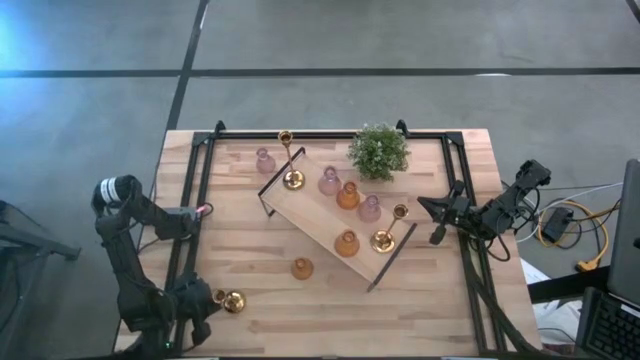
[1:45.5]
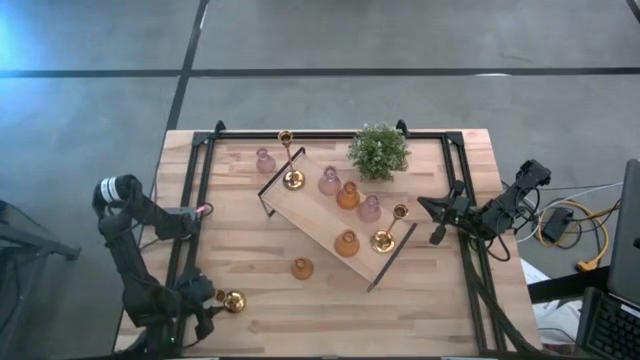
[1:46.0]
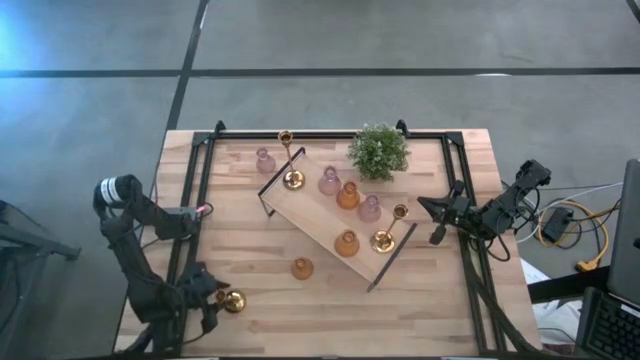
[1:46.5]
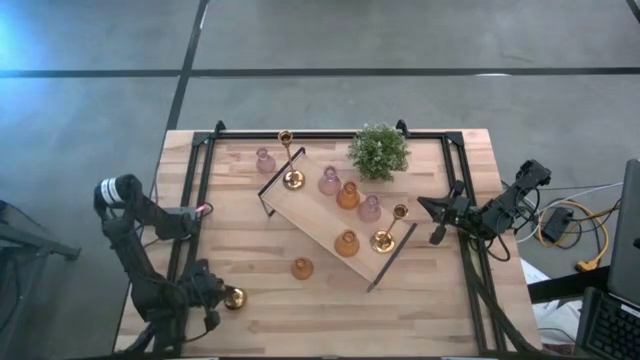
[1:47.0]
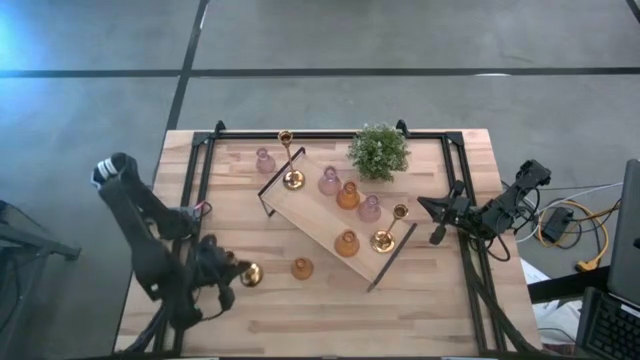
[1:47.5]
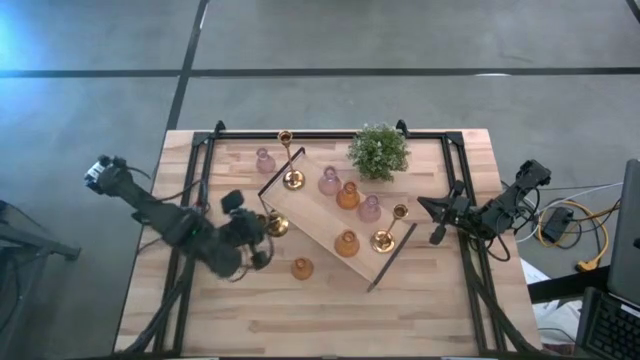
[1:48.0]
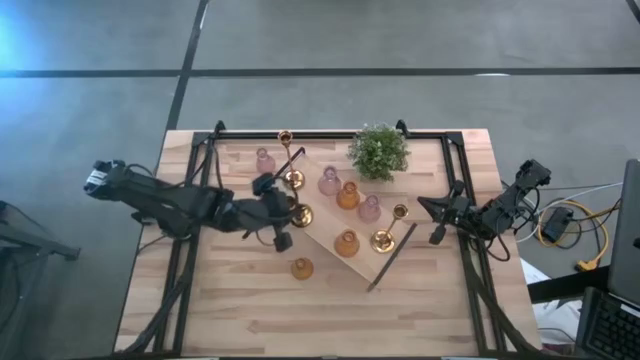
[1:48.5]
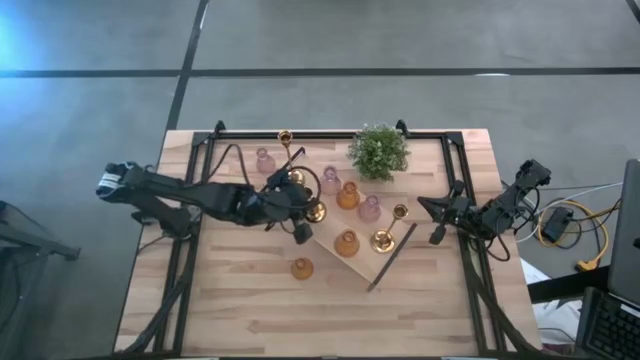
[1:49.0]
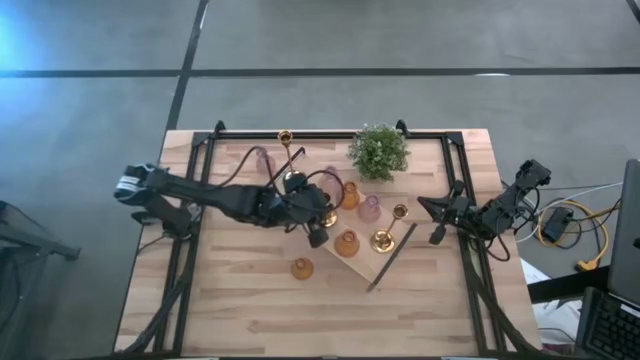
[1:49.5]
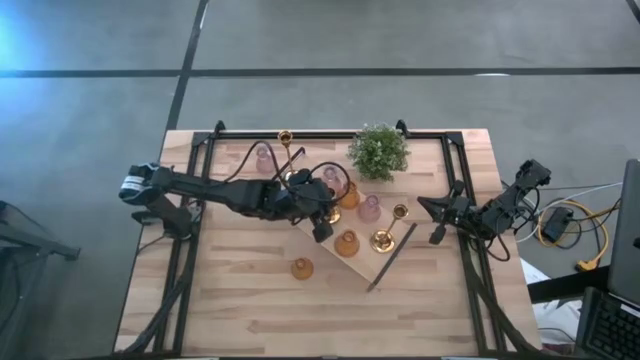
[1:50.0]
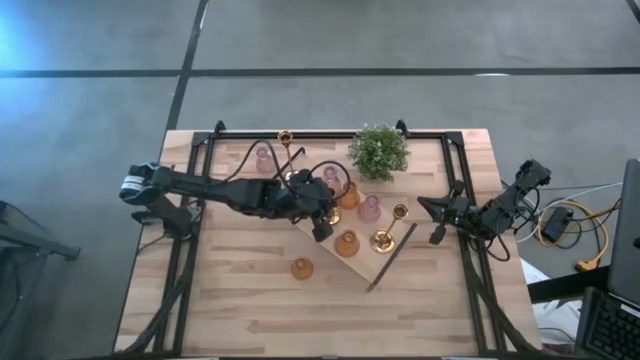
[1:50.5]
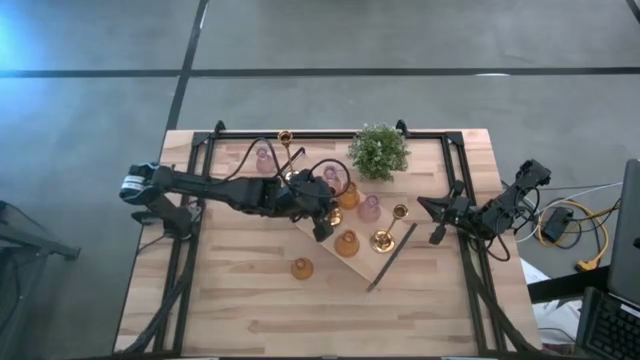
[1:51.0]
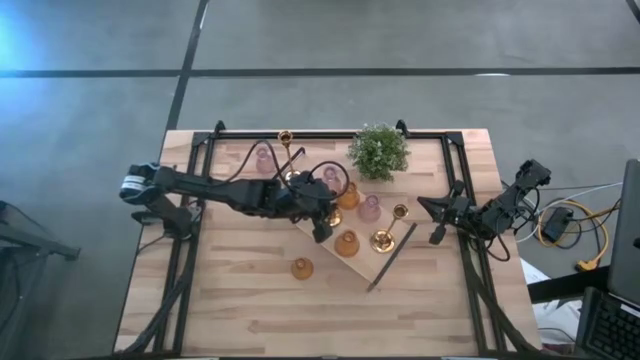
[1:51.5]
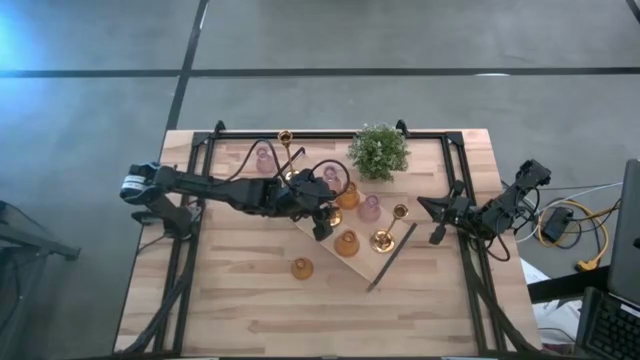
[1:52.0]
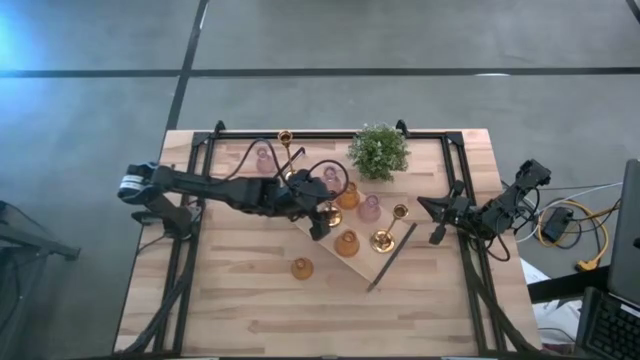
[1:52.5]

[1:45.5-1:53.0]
Task: Pick & Place candle stick holders
Put the gold candle holder on the shelf

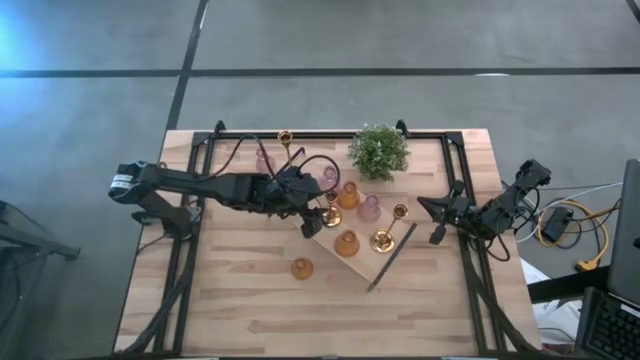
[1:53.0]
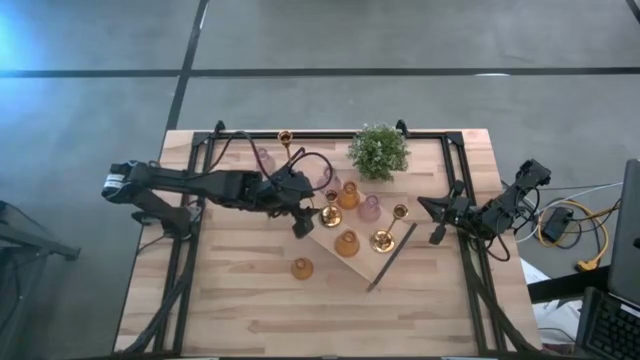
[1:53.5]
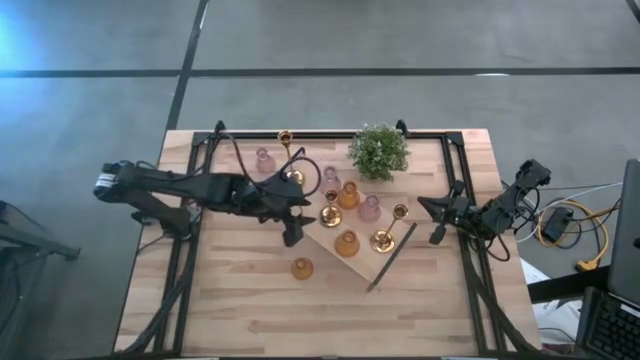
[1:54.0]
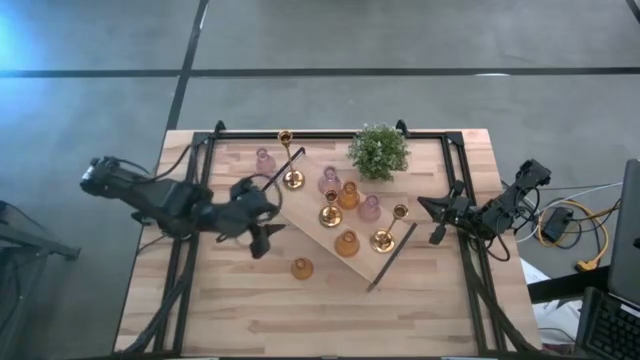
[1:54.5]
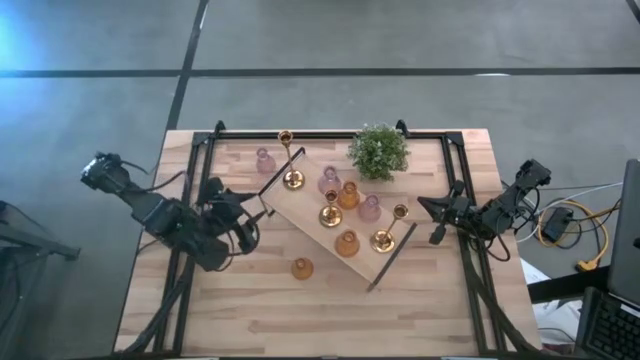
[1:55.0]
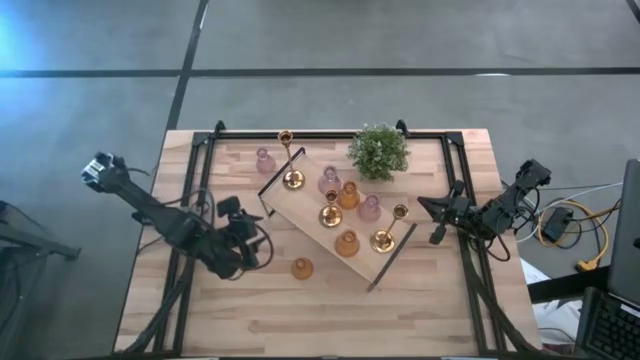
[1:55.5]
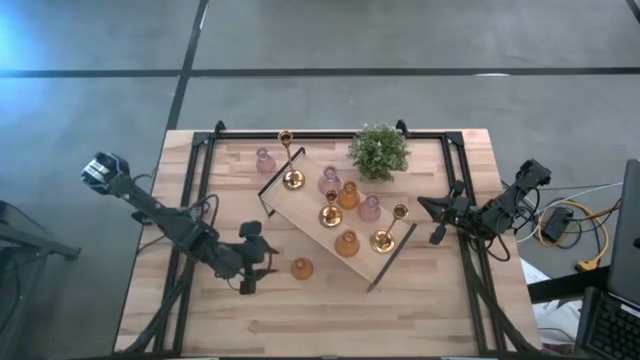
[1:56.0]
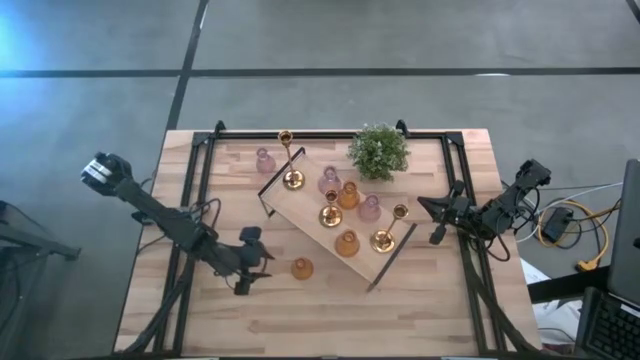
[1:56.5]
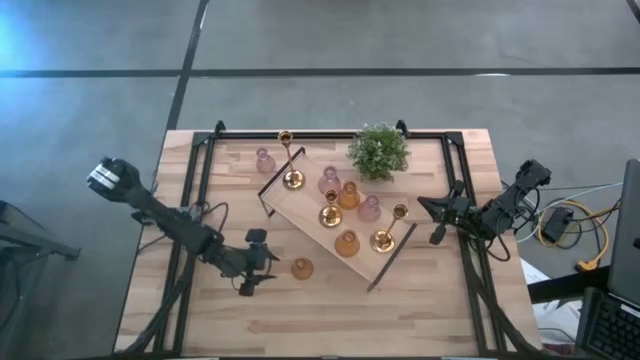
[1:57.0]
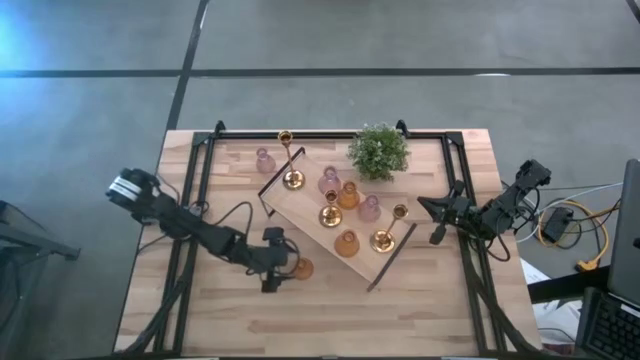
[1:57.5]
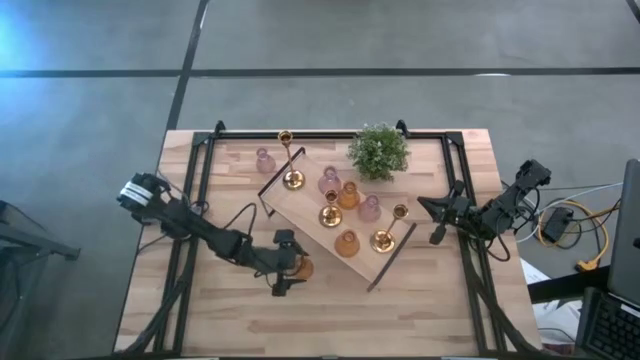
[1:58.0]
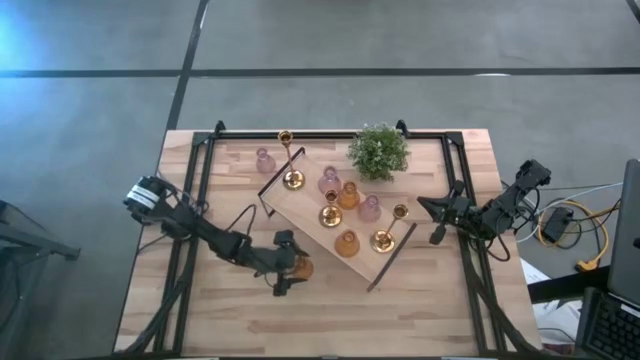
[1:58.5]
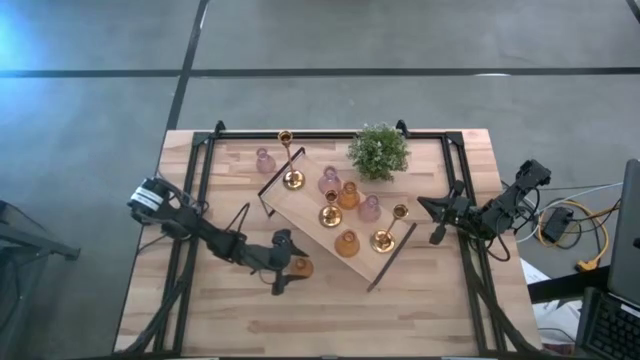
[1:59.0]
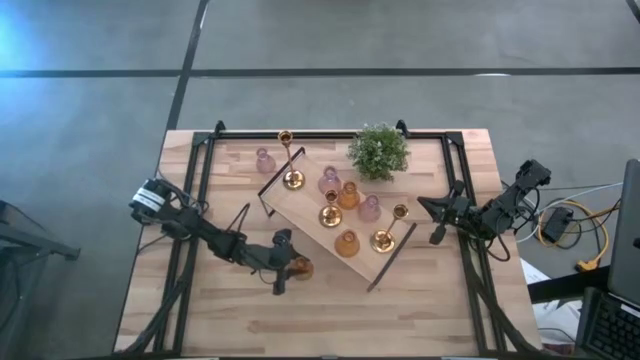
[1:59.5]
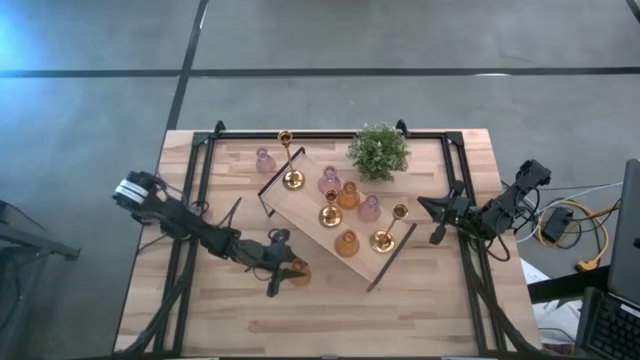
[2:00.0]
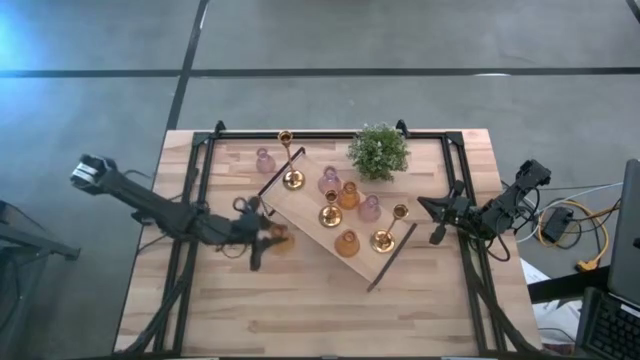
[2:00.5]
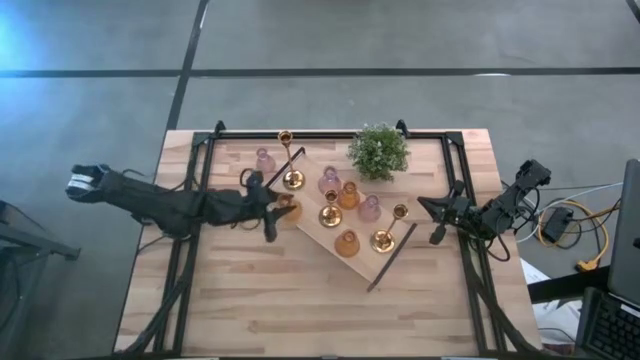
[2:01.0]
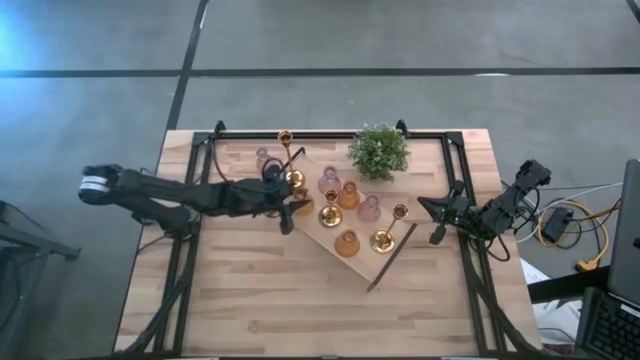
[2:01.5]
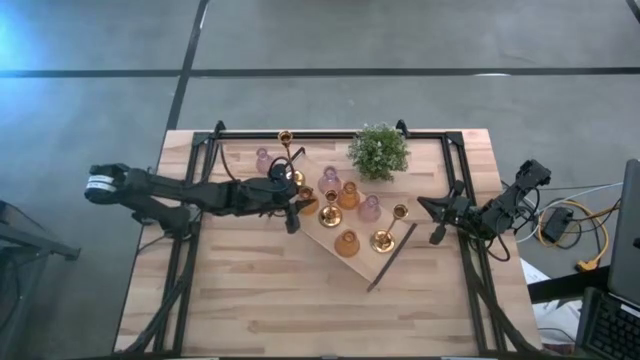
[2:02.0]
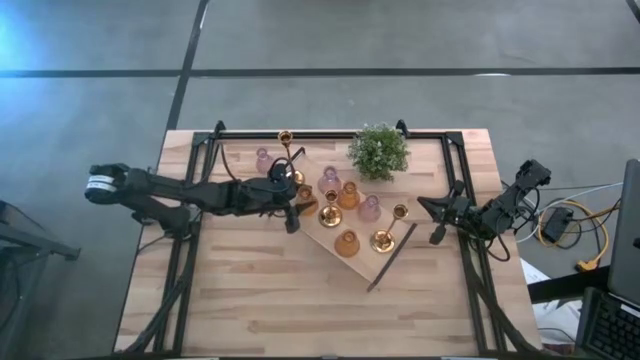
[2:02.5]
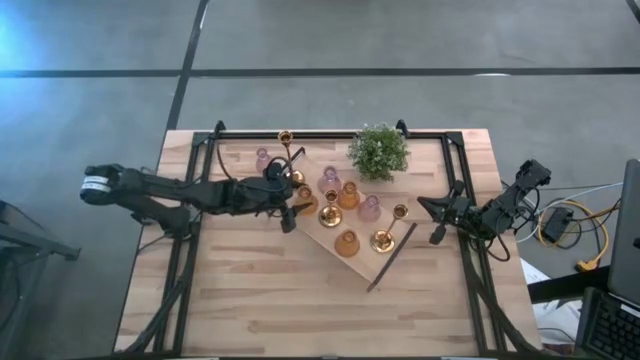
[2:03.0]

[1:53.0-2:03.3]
Put the yellow glass candle holder on the shelf

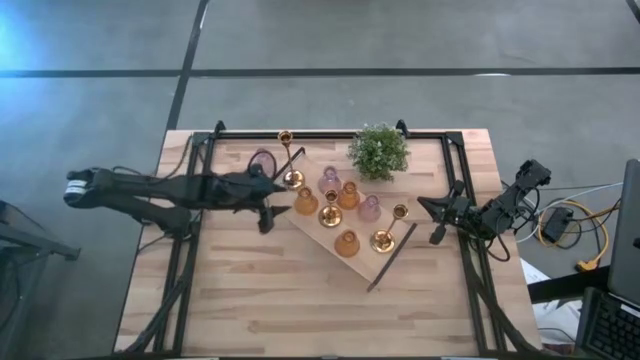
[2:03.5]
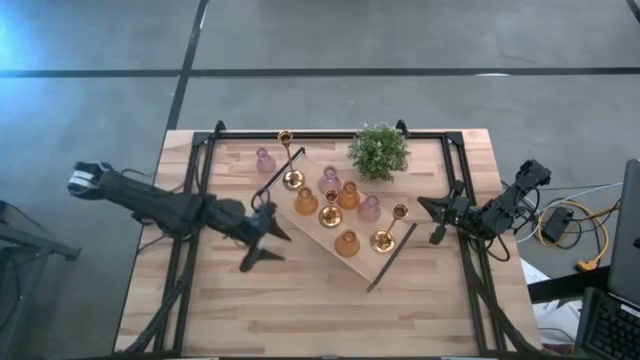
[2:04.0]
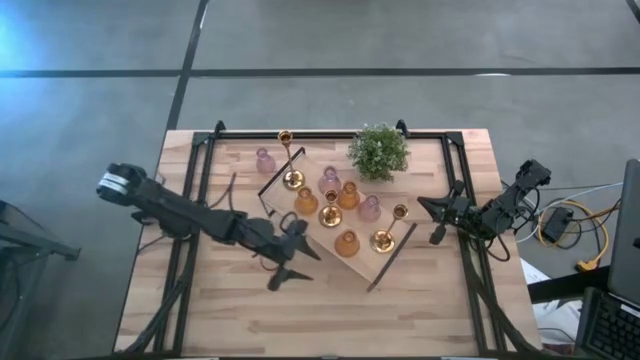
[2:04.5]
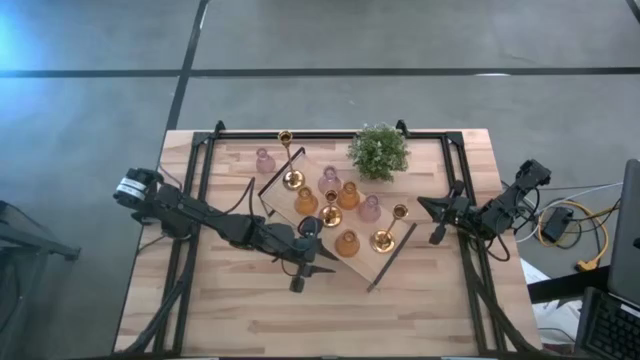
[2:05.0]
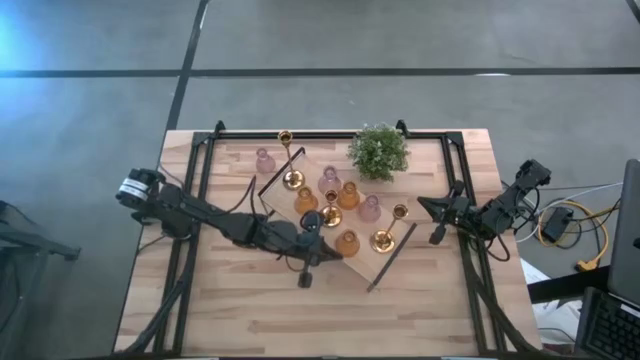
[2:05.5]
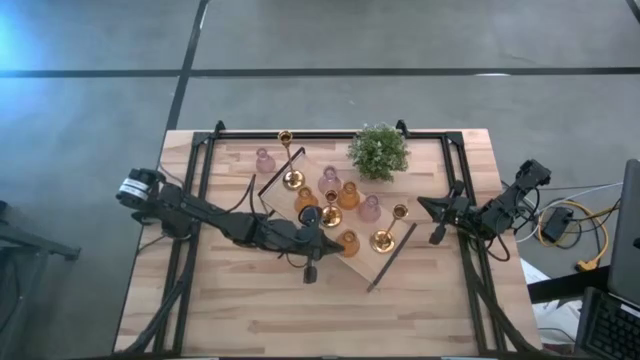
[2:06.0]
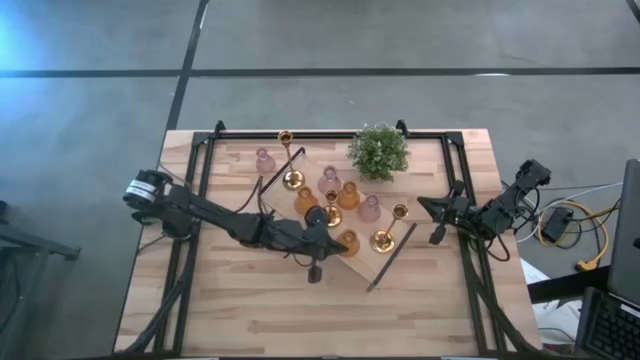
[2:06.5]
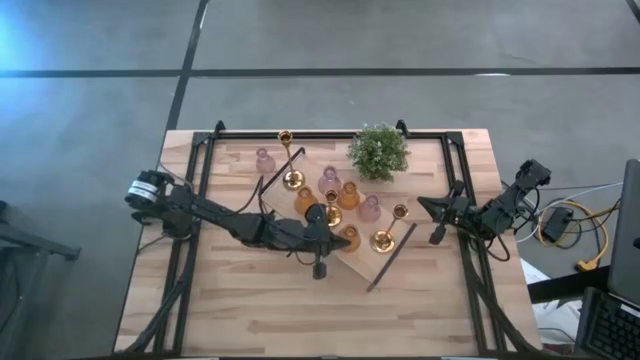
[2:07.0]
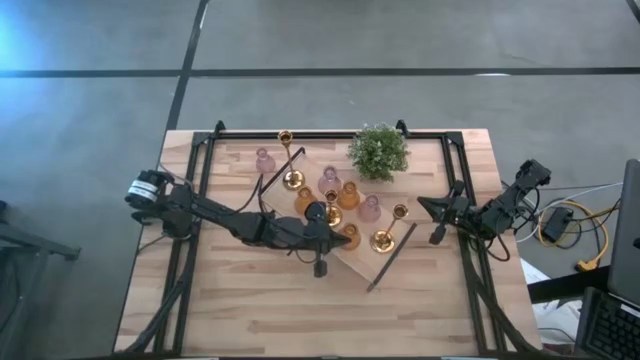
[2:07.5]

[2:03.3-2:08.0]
Adjust the yellow glass candle holder on the shelf
